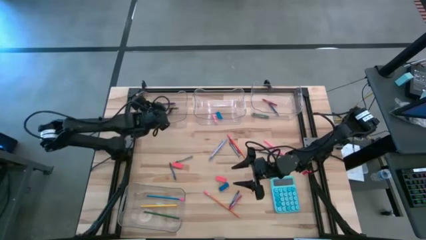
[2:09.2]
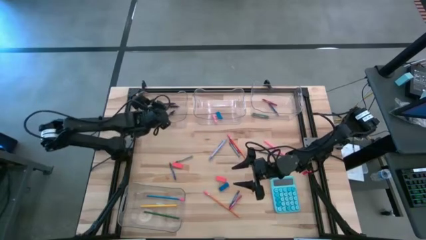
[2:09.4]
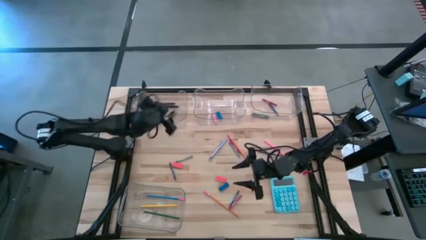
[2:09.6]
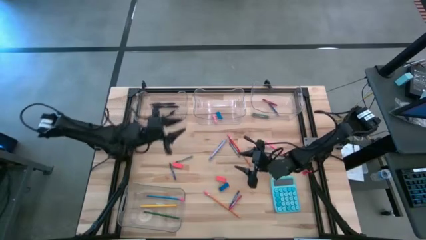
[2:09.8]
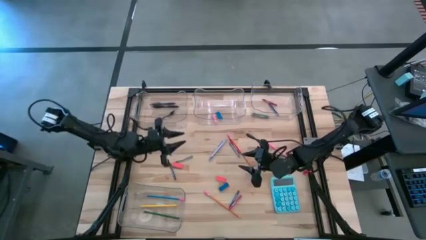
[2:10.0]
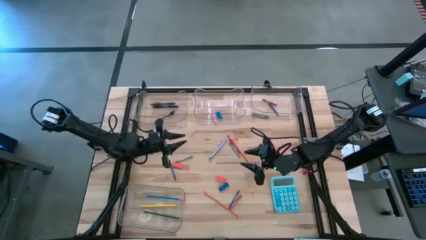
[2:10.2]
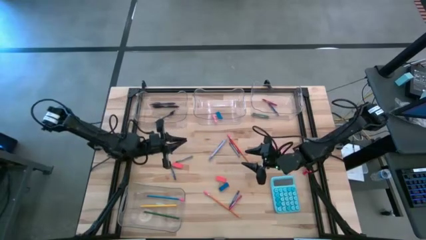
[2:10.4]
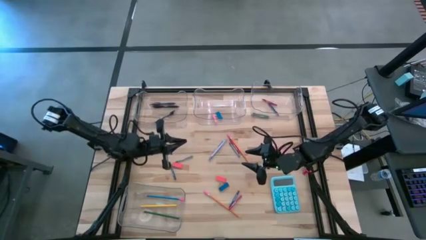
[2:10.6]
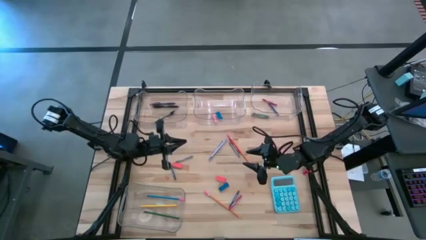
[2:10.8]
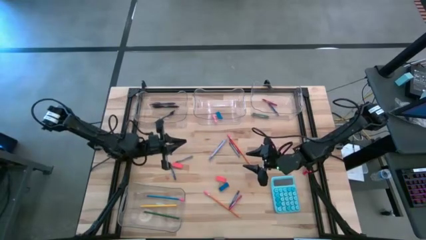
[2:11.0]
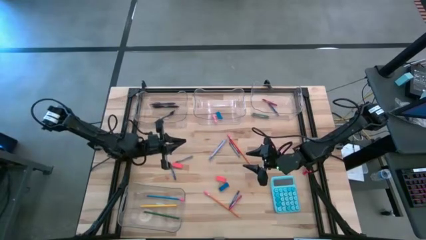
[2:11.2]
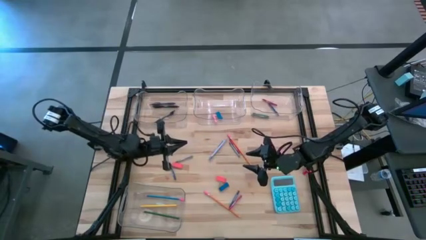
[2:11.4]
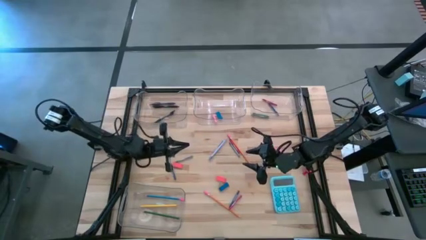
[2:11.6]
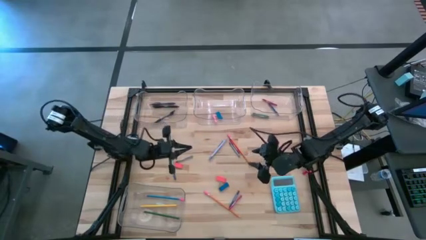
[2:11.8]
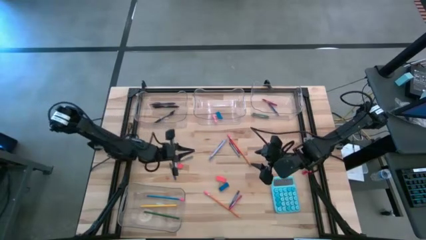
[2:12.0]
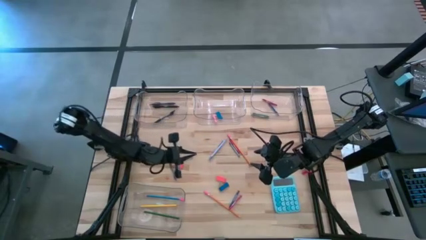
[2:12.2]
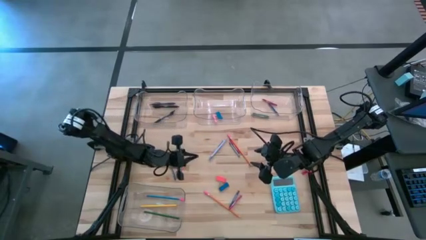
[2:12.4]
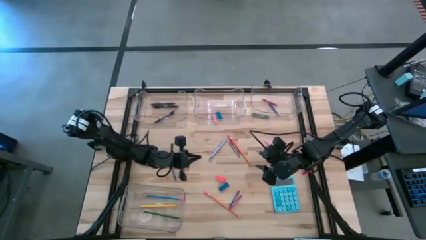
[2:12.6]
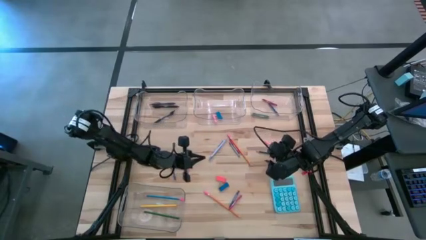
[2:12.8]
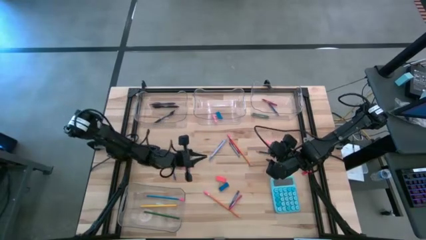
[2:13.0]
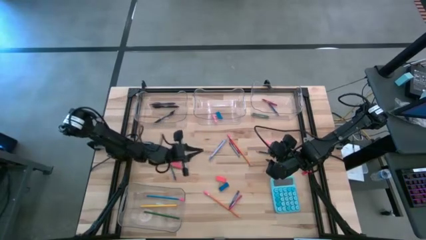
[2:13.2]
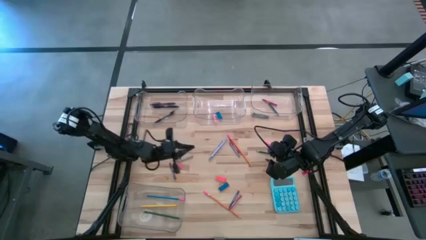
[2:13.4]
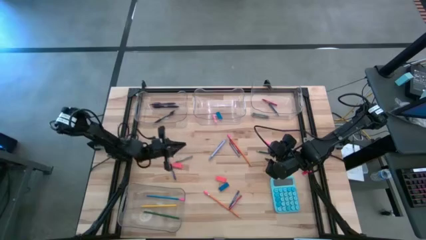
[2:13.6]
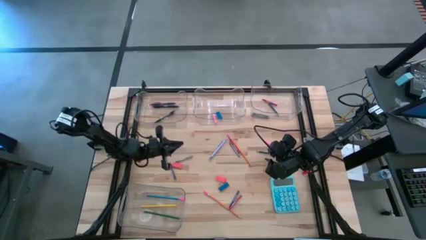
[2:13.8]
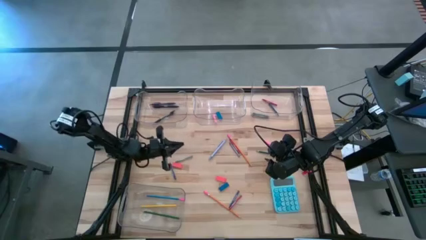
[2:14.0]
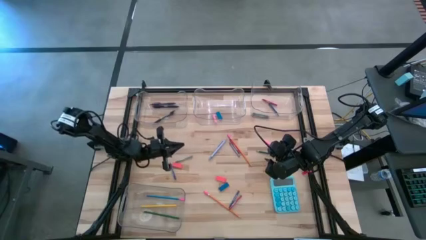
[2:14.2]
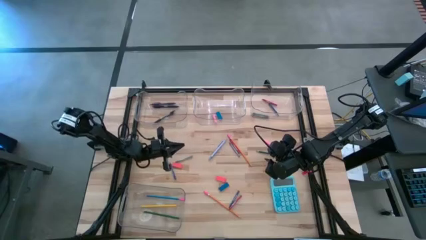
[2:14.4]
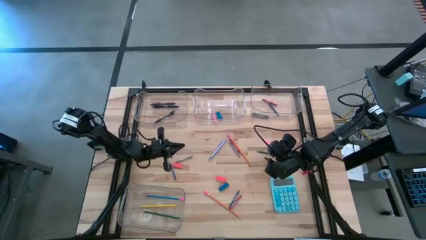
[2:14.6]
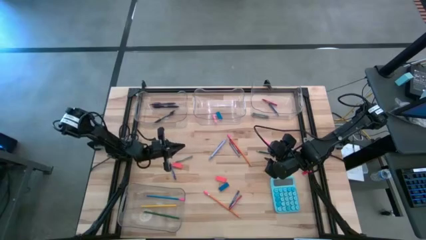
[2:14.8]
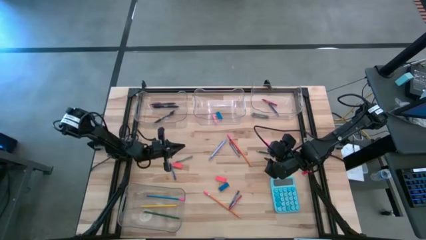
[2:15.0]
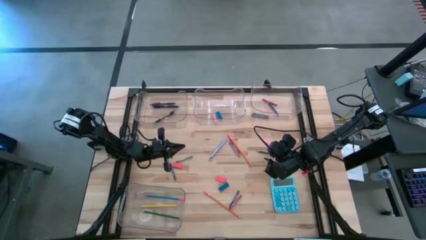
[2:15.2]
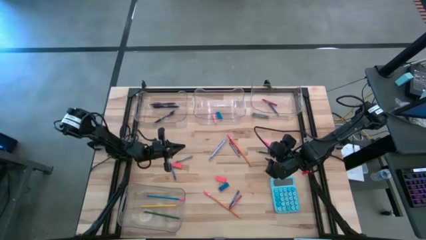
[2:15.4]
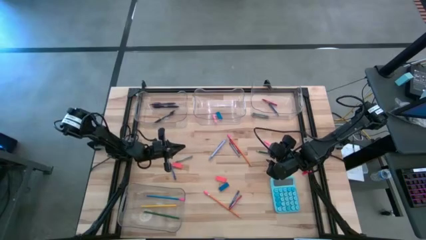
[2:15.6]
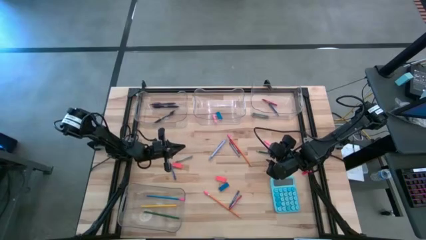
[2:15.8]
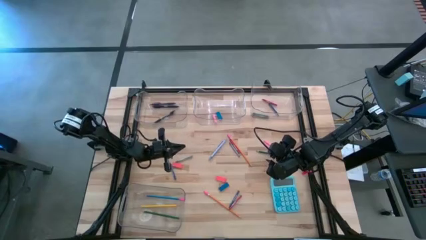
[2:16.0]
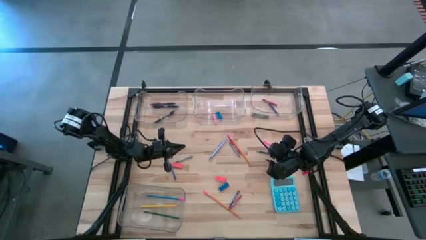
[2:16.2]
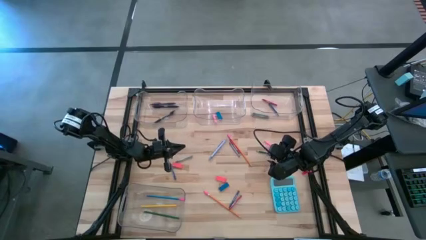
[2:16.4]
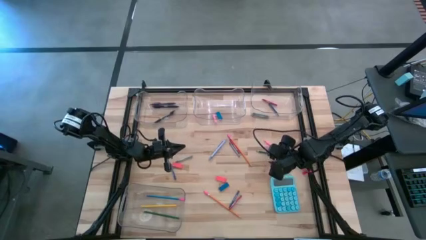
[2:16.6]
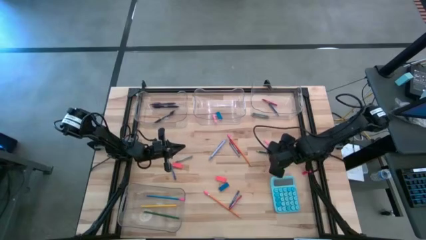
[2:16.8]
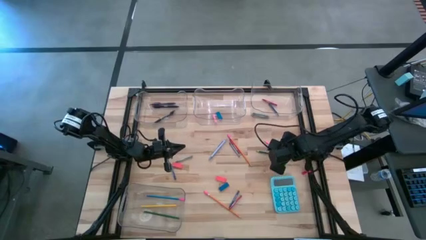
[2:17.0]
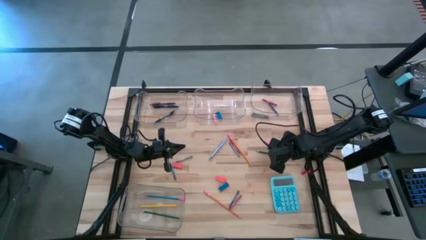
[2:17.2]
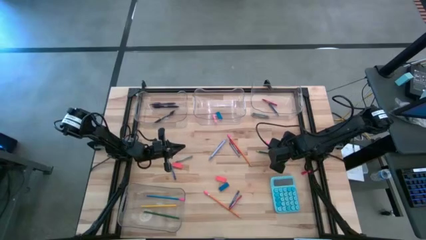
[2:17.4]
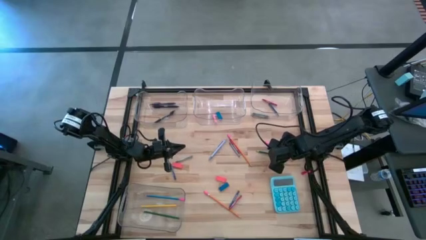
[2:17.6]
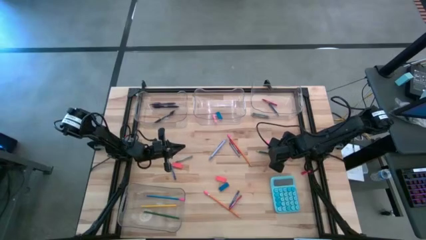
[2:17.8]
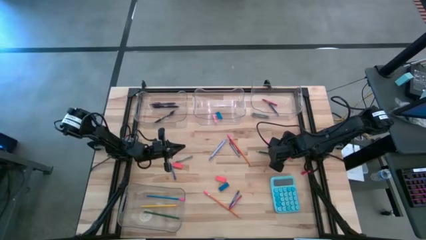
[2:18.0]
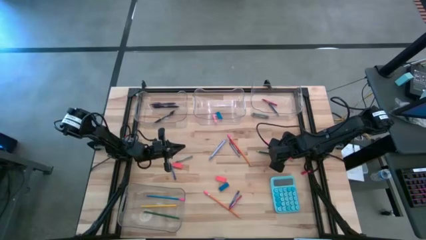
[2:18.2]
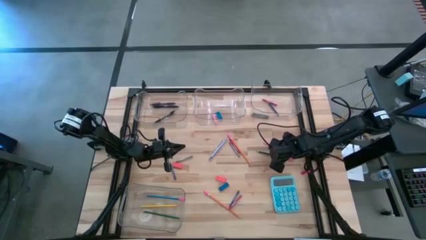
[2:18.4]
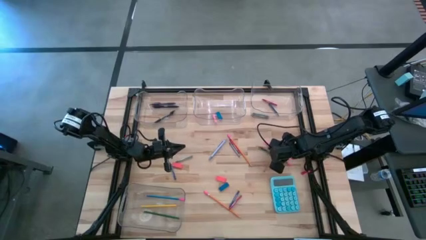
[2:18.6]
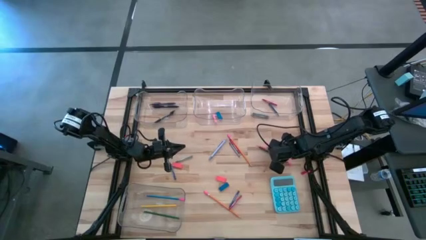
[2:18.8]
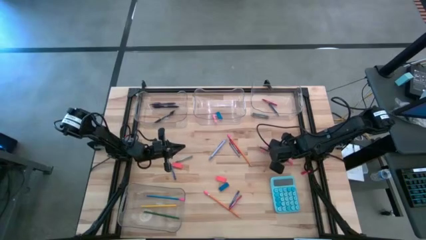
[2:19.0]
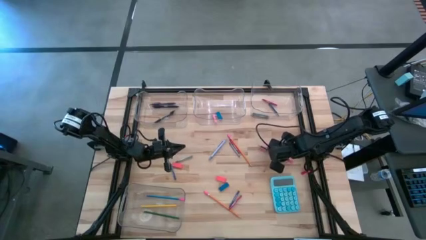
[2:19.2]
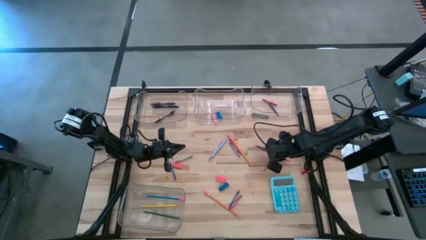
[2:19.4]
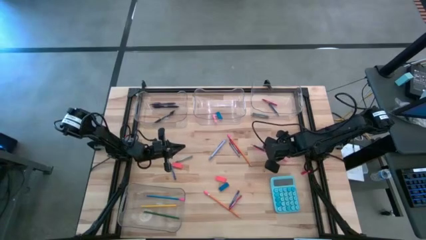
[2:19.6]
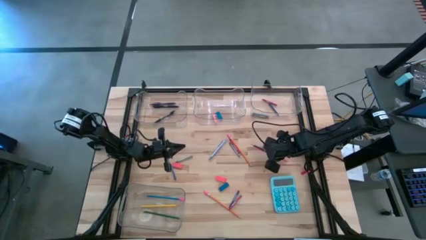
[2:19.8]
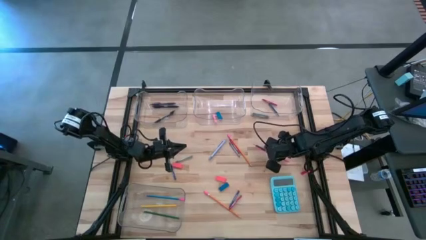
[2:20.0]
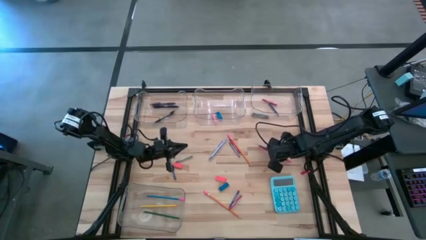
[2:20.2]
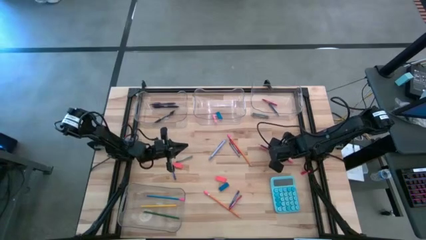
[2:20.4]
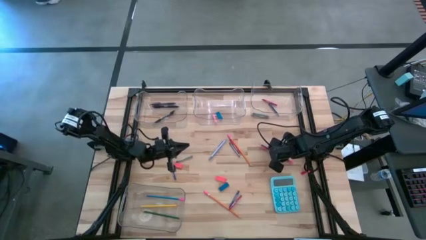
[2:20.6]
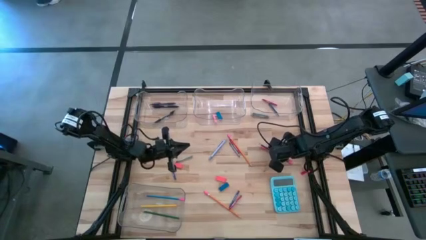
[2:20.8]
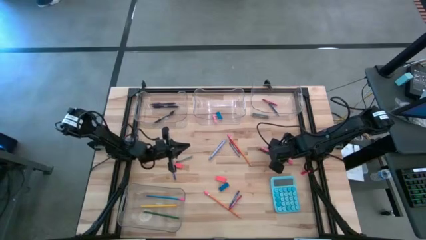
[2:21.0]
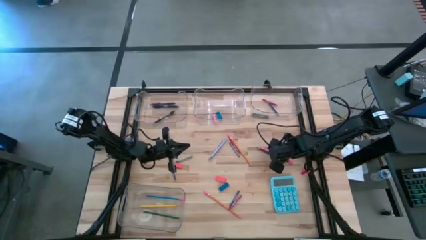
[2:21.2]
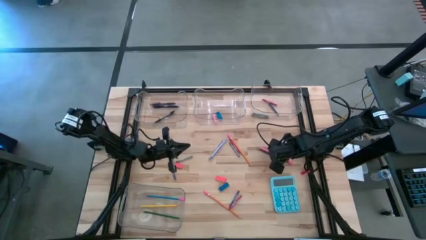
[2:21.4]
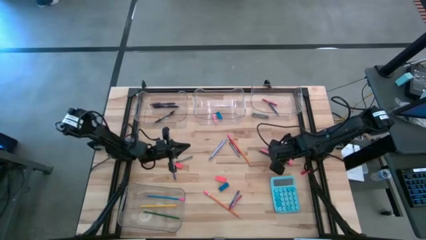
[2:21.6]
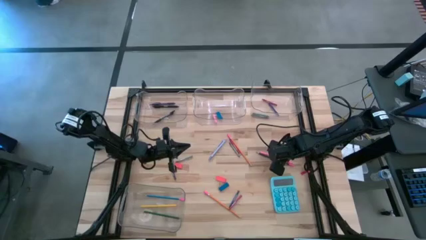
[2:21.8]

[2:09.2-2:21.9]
Task: Sort crayons/erasers/pens/pencils in bins
Put the dark green pencil into the bottom transparent bin

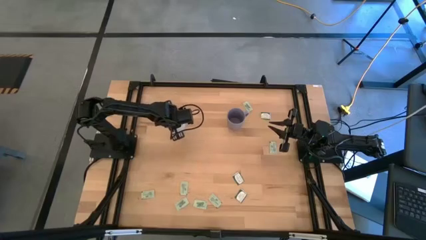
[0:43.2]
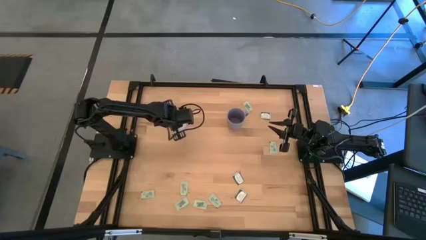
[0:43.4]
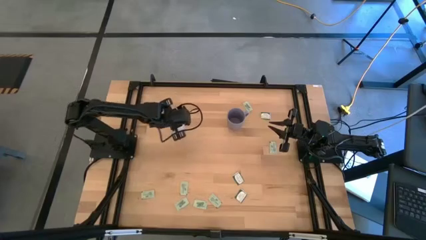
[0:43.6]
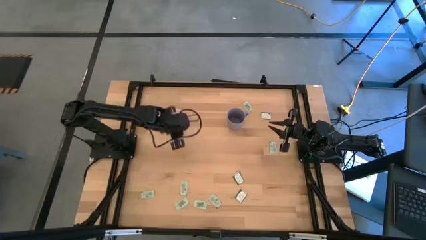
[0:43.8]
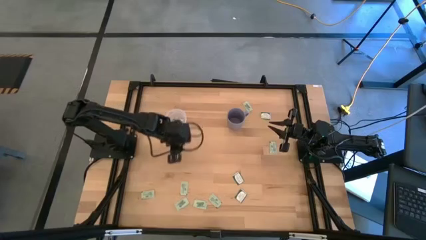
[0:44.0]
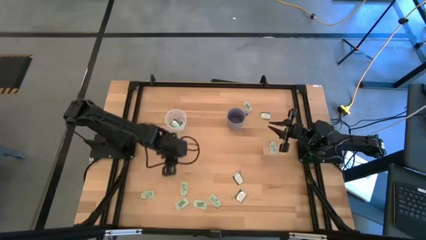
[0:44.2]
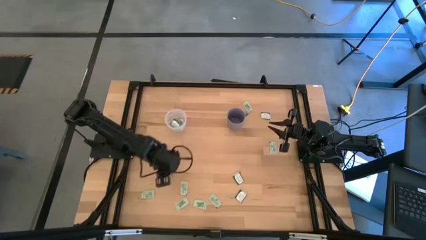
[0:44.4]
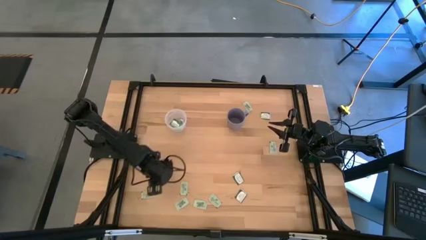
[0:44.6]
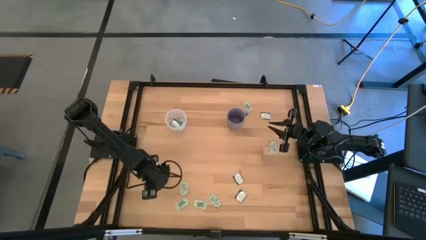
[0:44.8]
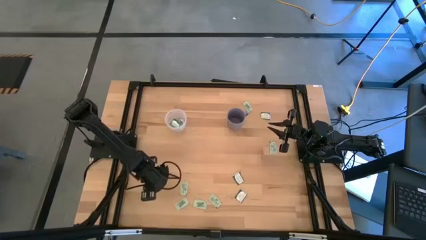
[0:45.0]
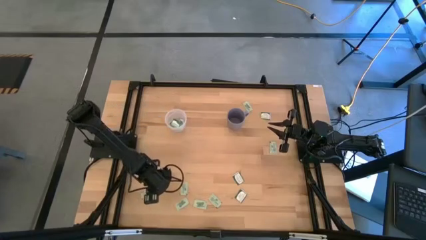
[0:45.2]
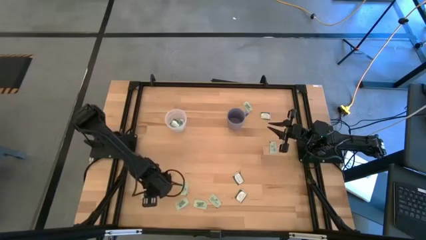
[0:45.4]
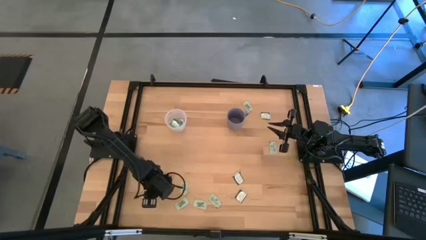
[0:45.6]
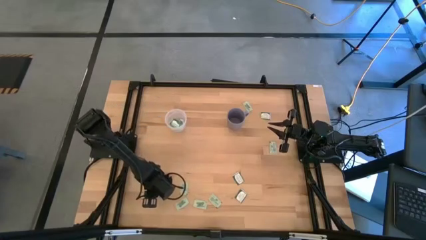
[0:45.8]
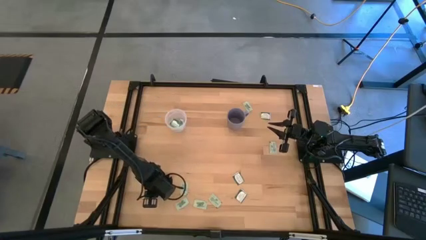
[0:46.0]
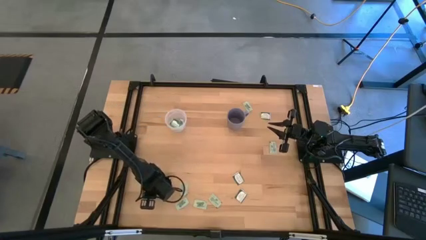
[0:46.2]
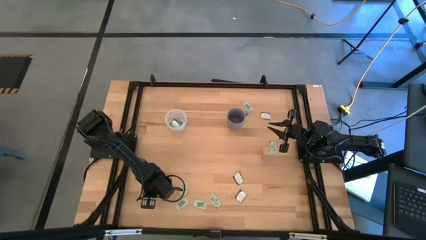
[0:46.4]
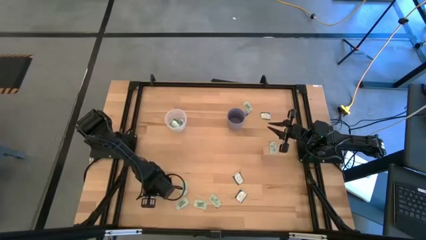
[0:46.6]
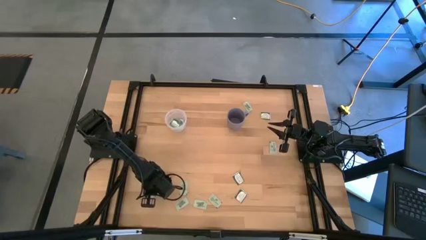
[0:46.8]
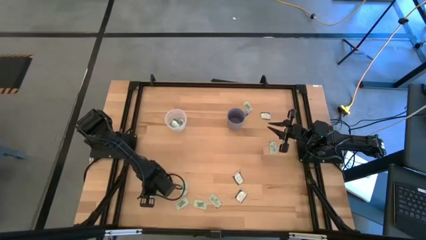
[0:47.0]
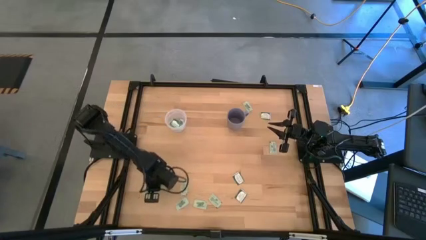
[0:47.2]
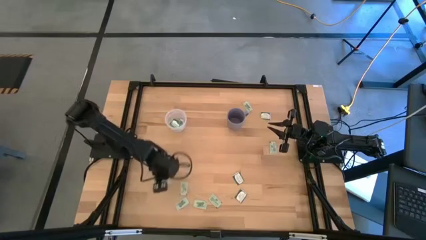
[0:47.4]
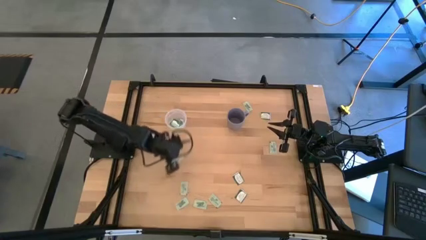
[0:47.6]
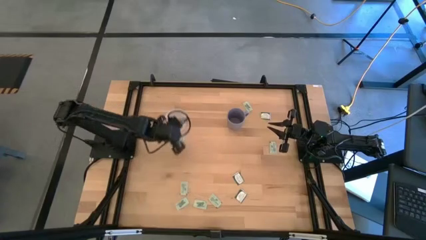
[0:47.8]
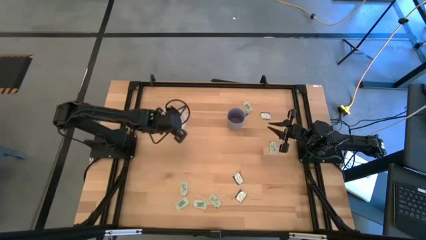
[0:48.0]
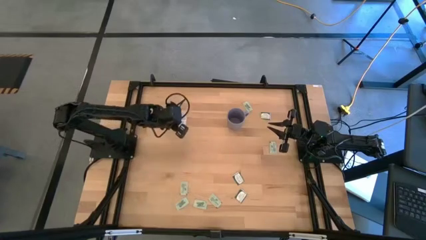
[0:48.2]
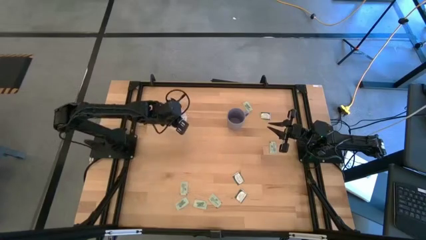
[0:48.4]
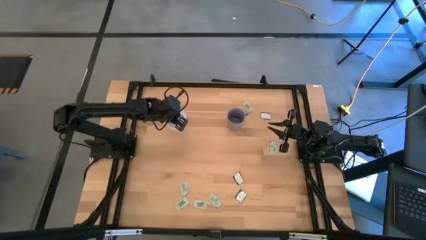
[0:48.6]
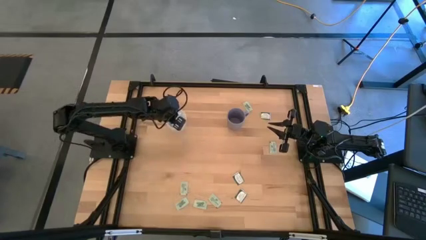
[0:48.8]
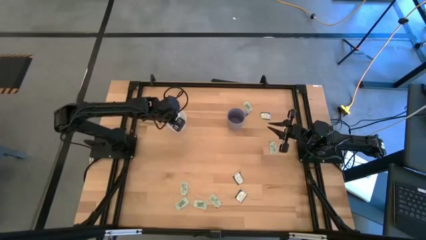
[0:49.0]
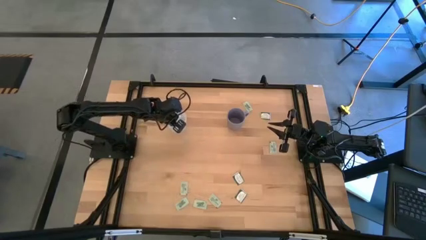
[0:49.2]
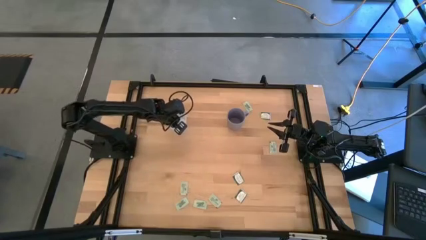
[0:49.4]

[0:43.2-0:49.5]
Task: Pick and place Stevia / Truvia into bins
Put the light green stevia packet into the transparent container
